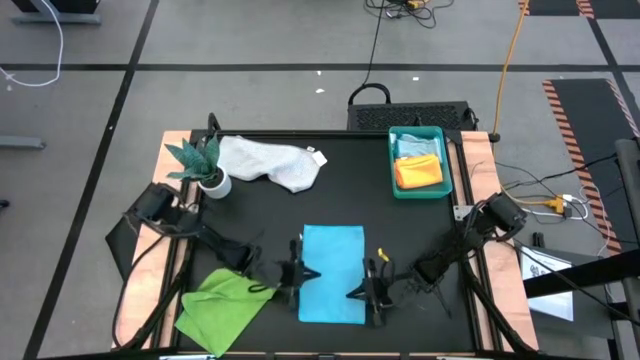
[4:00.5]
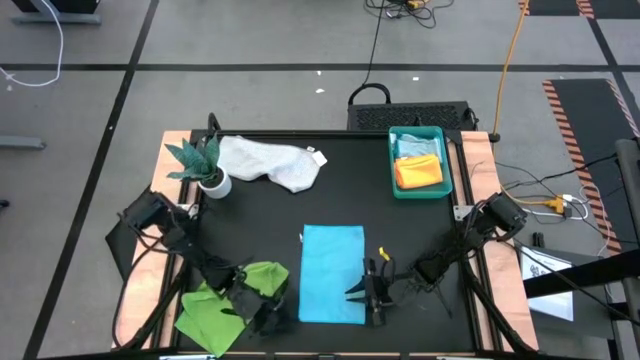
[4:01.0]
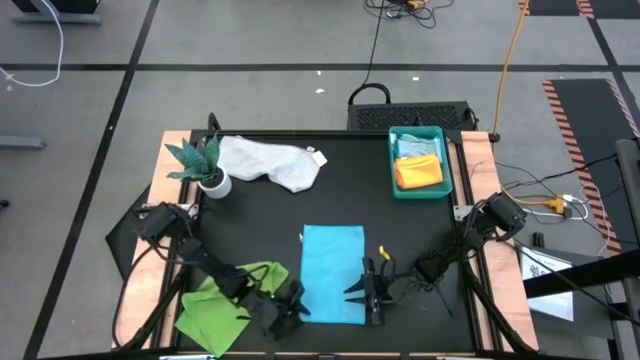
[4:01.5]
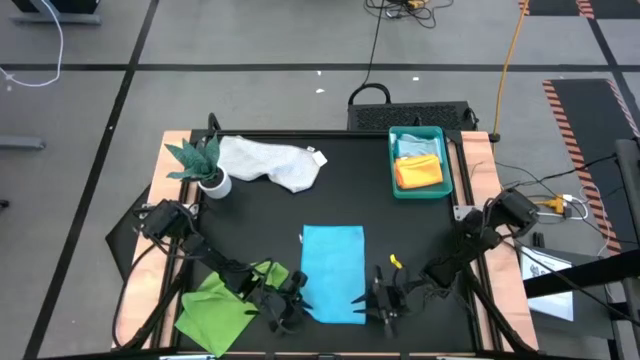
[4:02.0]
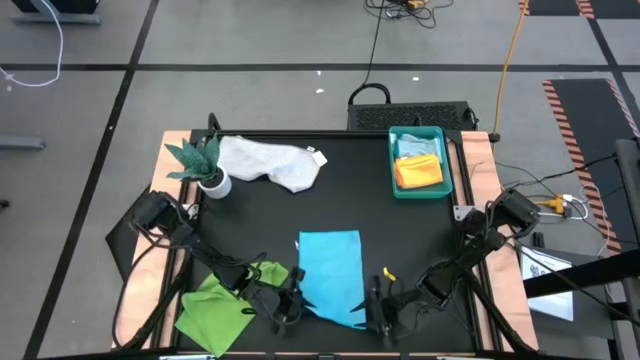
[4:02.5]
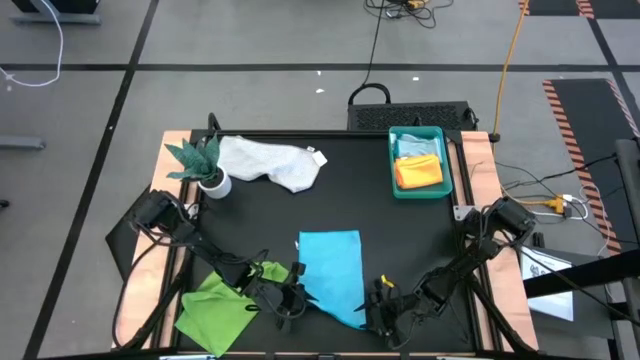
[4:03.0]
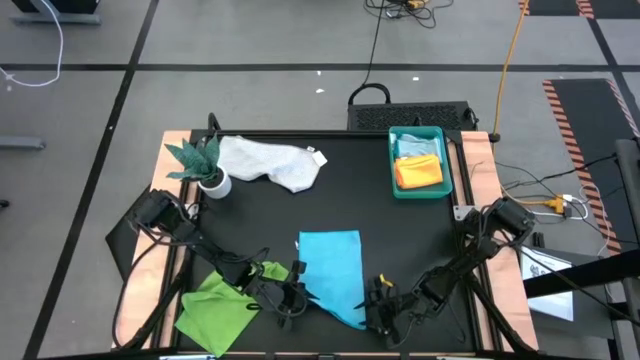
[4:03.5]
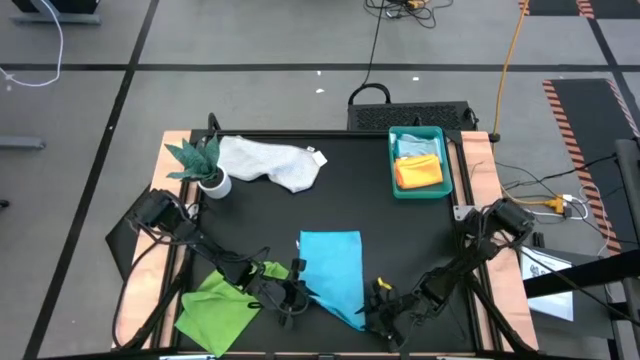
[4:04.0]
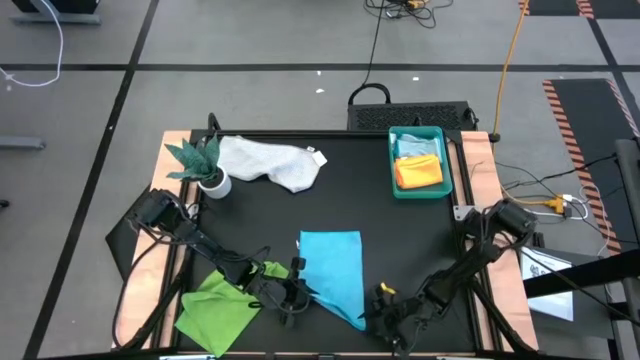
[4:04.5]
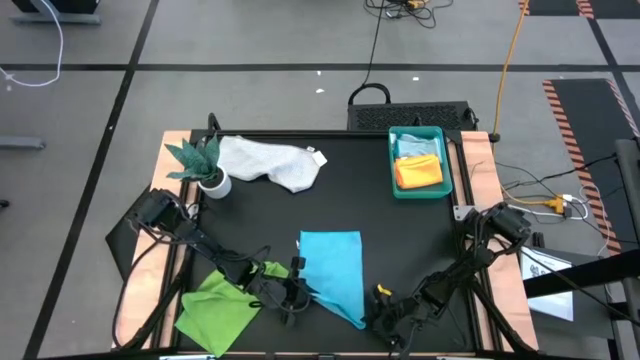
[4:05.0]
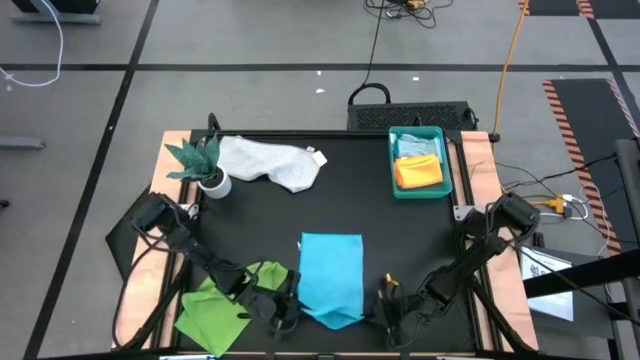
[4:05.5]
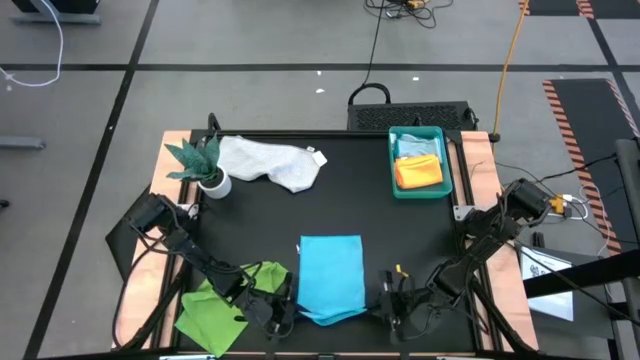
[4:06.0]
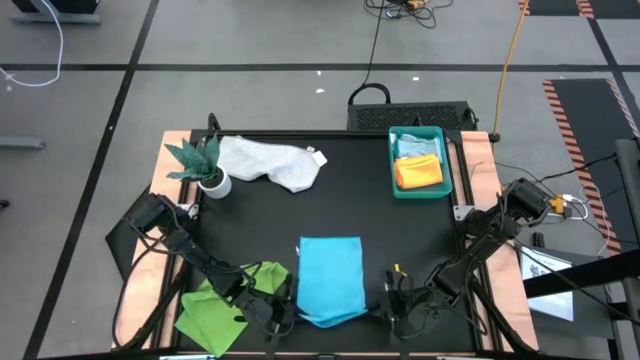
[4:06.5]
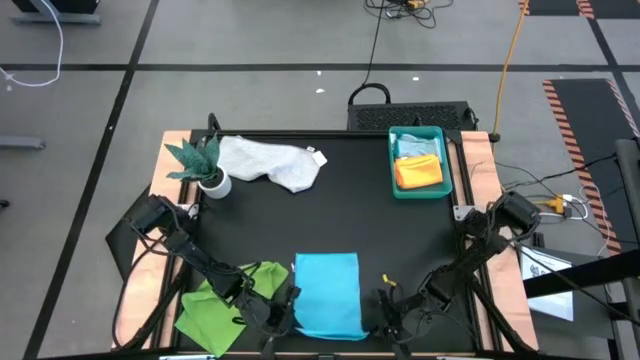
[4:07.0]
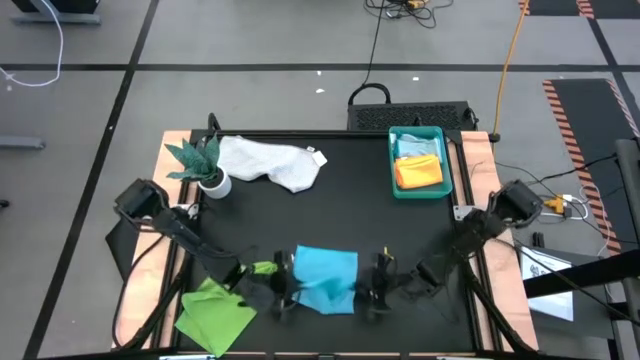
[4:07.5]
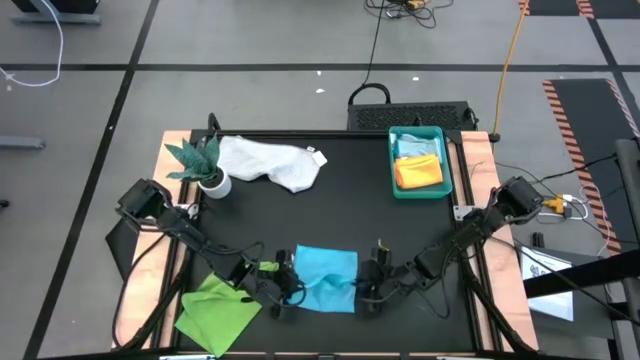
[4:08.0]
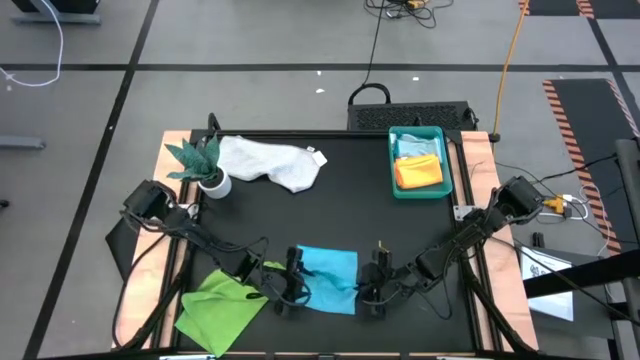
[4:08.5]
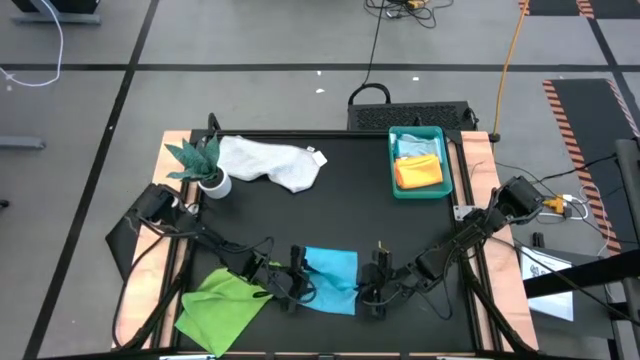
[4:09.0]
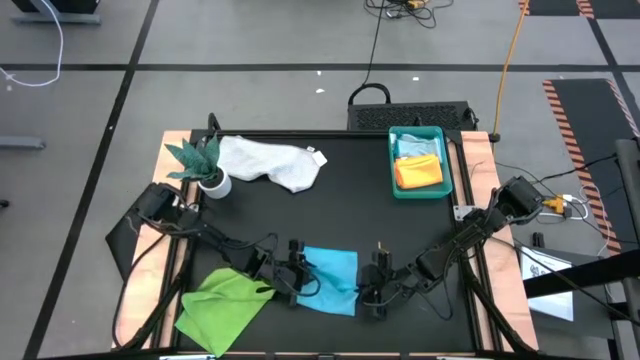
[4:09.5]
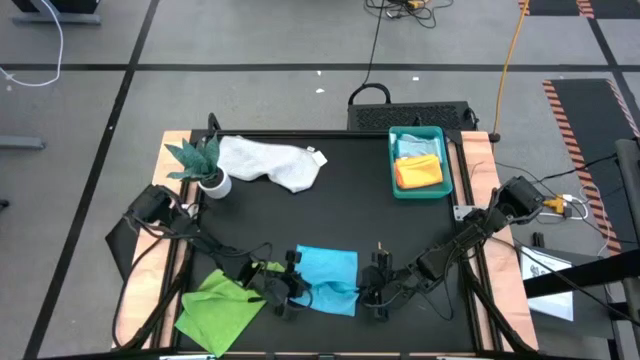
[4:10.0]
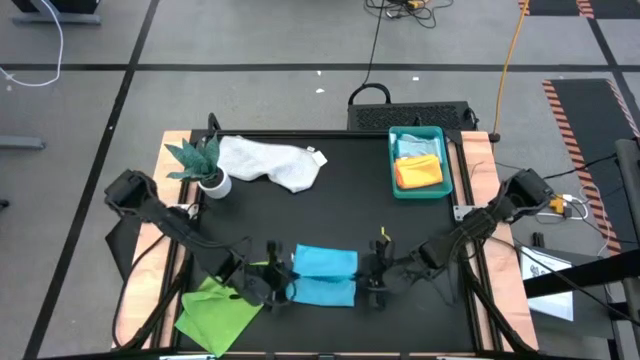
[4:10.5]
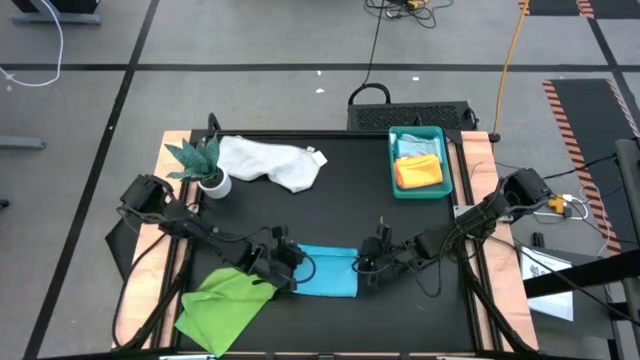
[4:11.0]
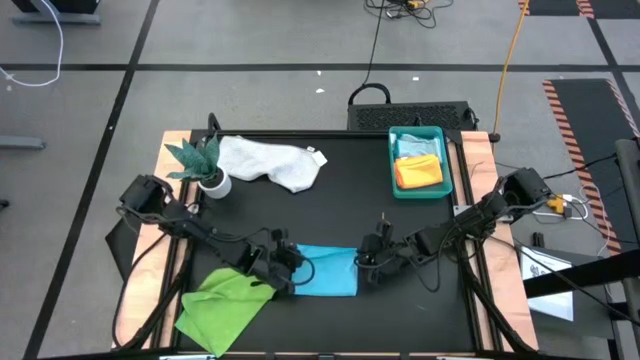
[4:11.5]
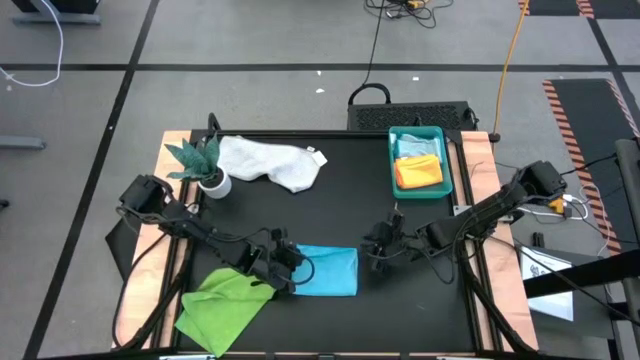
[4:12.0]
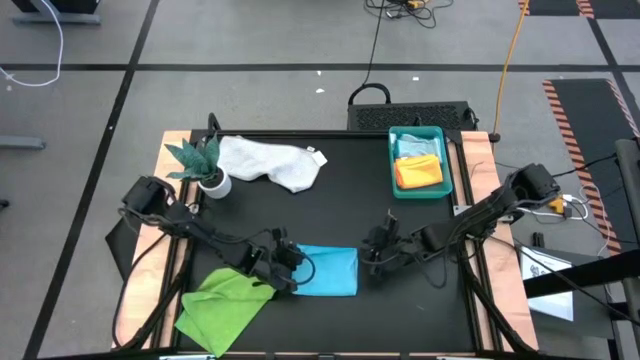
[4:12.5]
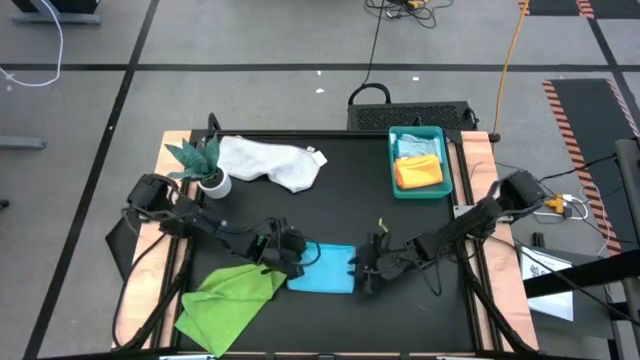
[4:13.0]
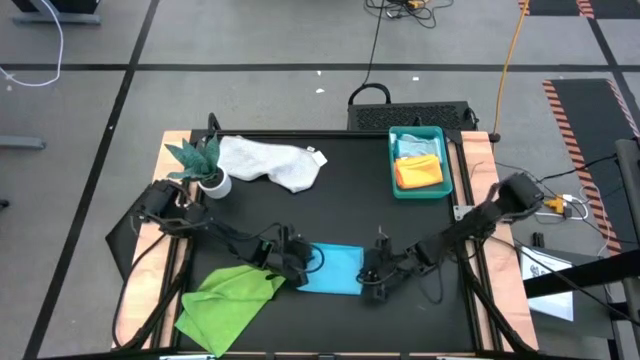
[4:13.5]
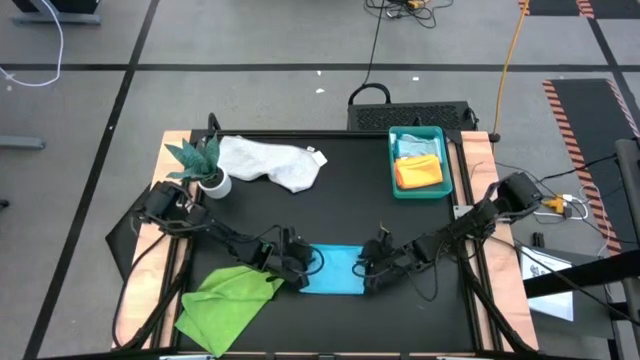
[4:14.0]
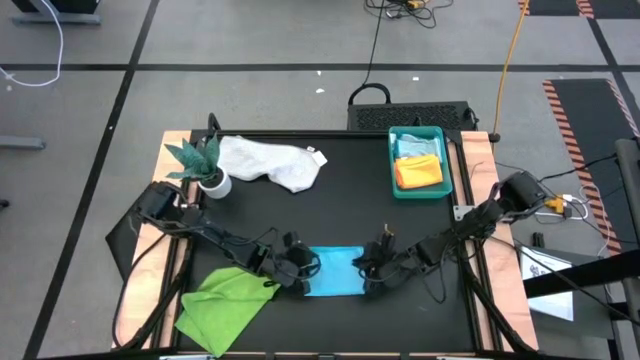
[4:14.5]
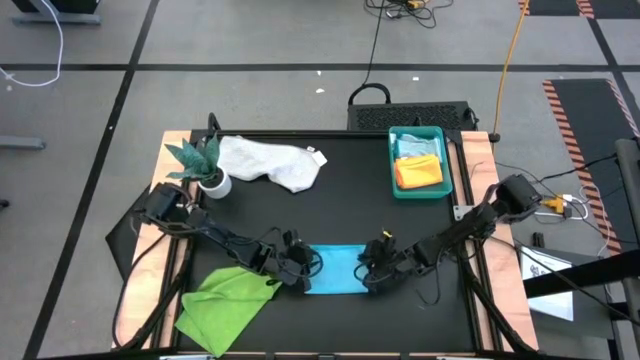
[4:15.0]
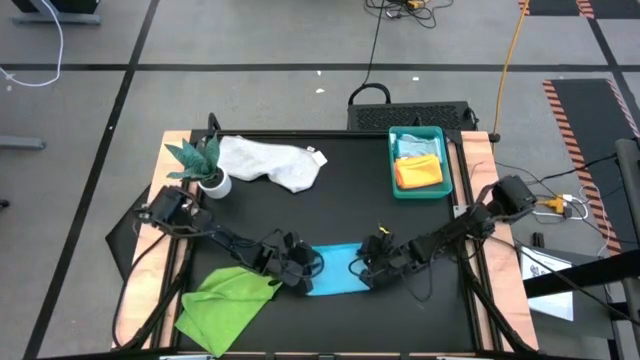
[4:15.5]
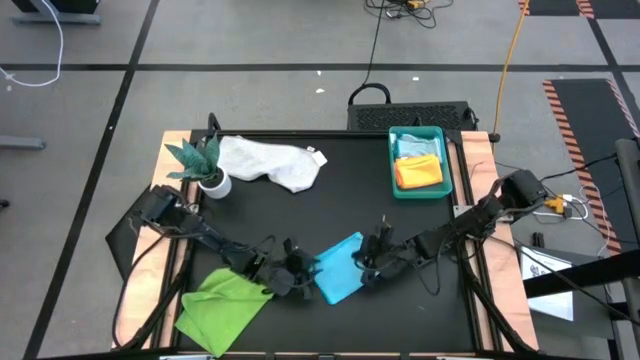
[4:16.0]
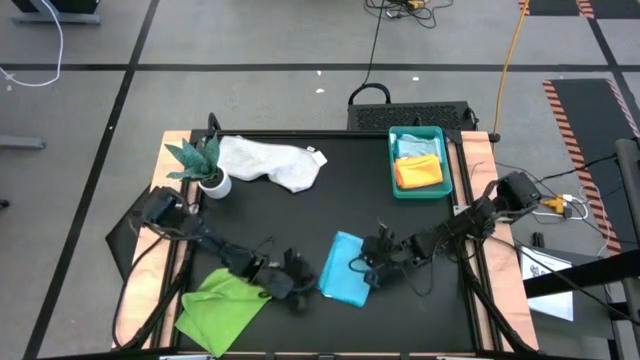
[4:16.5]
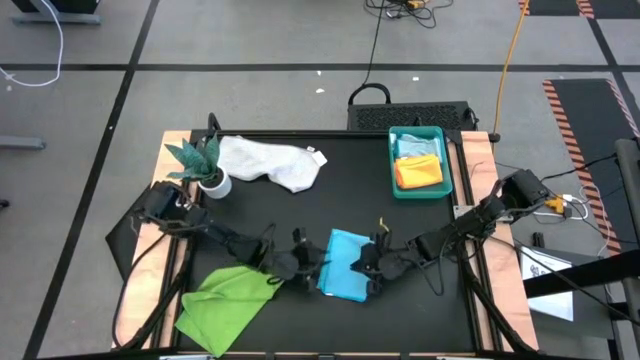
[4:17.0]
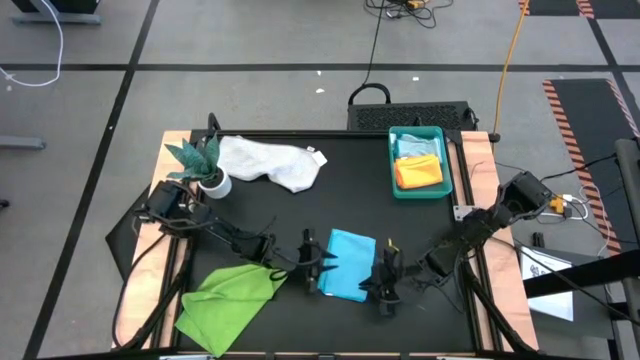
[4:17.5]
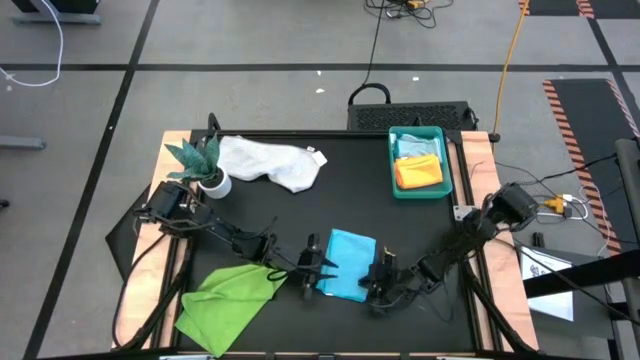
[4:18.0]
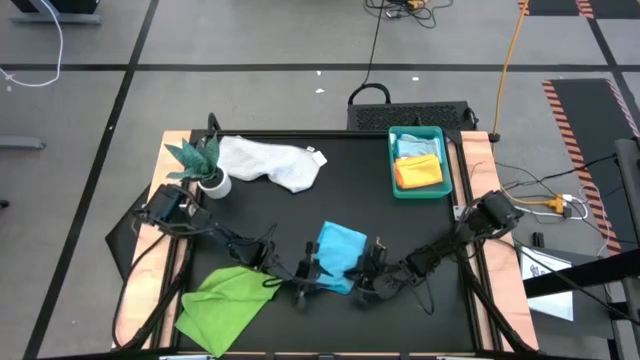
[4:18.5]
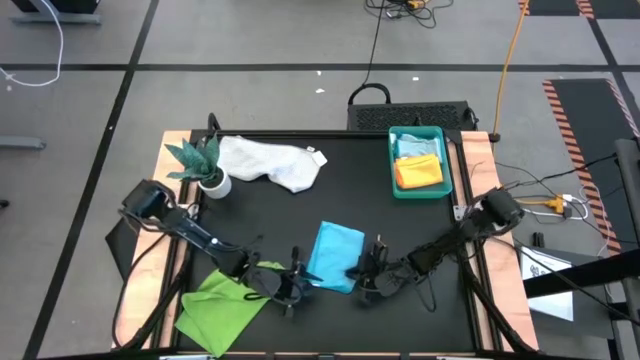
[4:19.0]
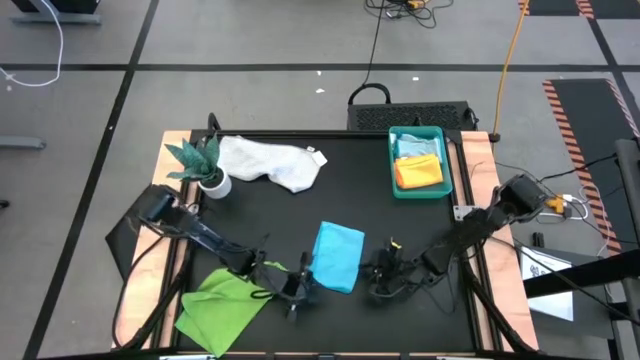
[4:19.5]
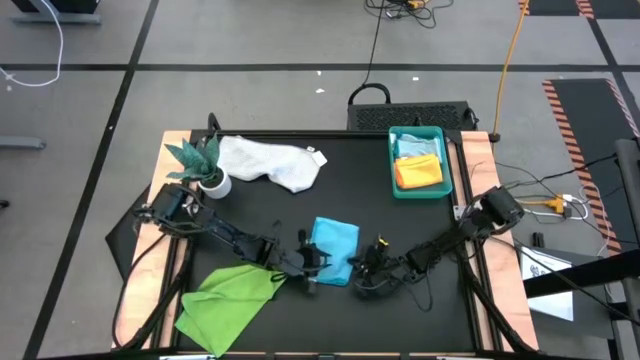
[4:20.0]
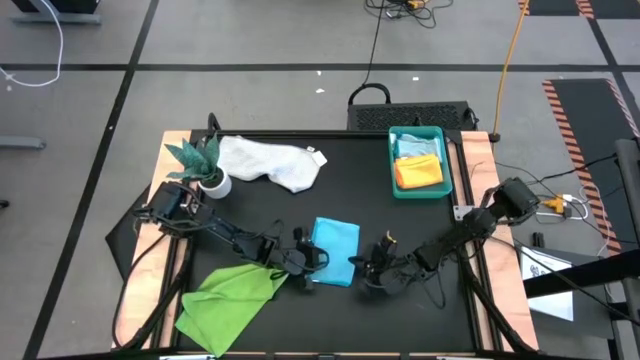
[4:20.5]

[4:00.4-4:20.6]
Task: Fold microfiber towels
Fold the blue microfiber cloth
